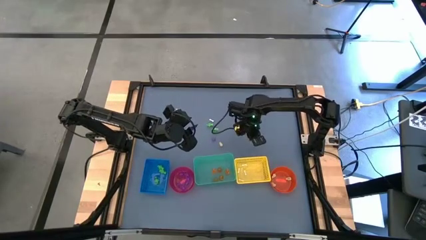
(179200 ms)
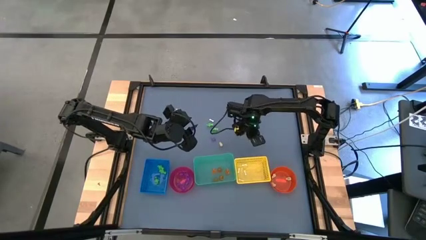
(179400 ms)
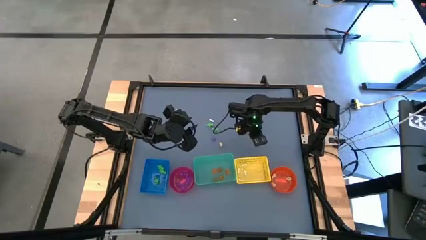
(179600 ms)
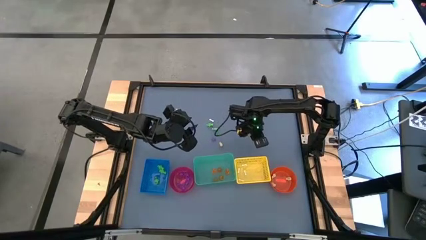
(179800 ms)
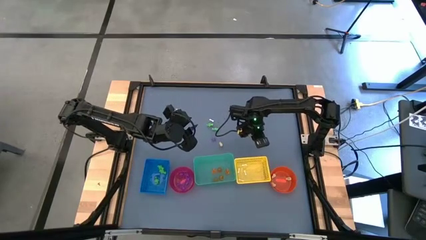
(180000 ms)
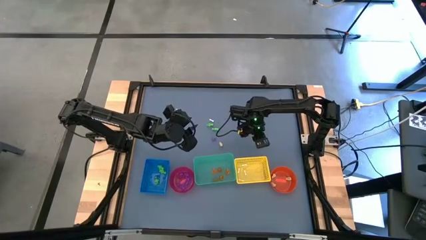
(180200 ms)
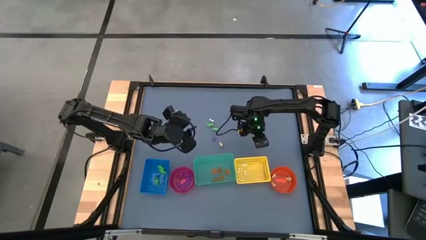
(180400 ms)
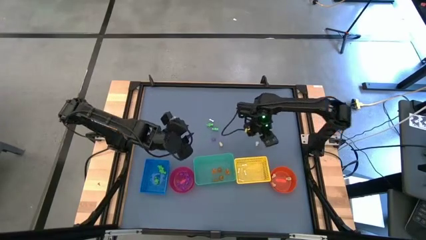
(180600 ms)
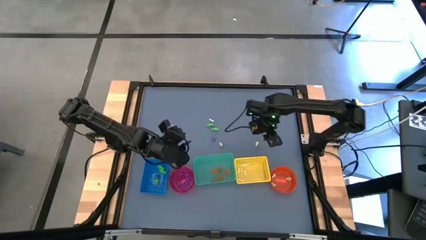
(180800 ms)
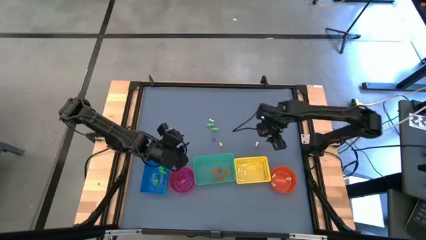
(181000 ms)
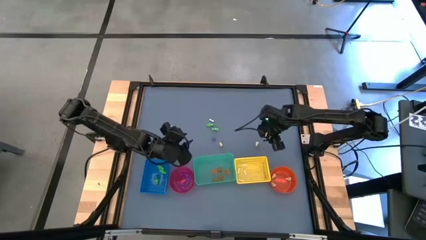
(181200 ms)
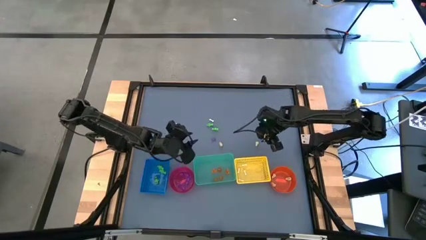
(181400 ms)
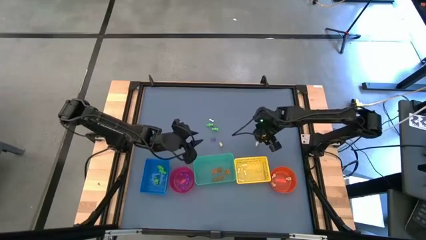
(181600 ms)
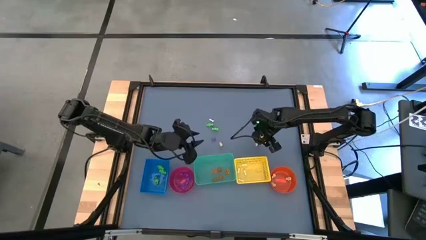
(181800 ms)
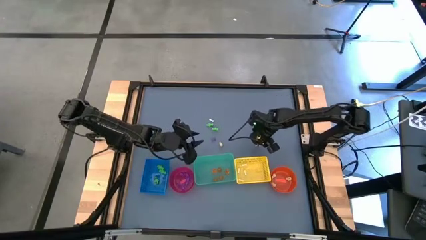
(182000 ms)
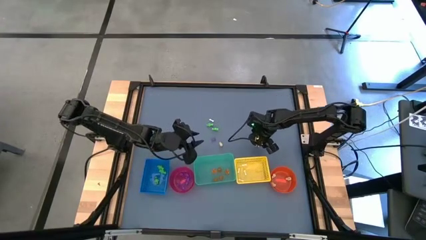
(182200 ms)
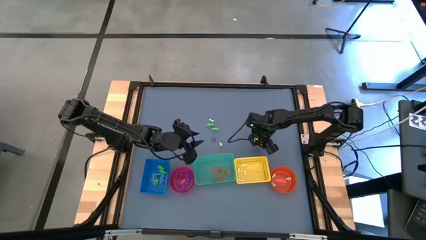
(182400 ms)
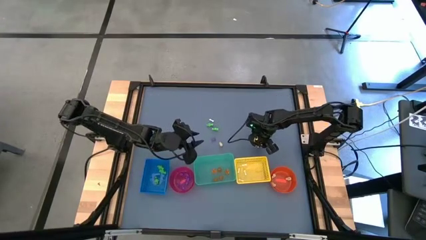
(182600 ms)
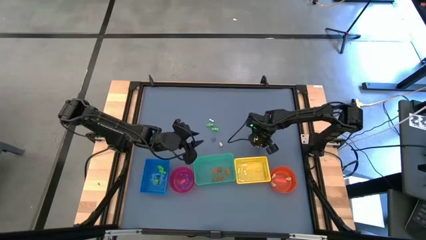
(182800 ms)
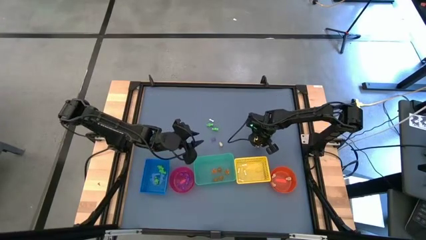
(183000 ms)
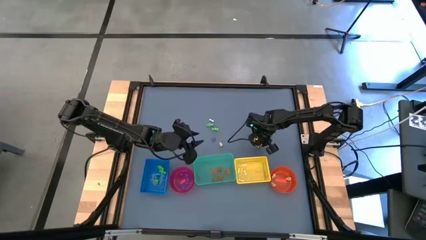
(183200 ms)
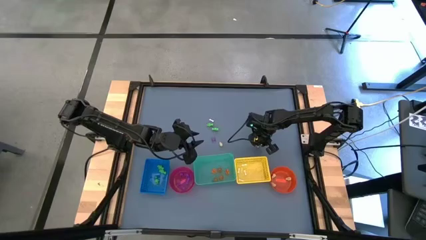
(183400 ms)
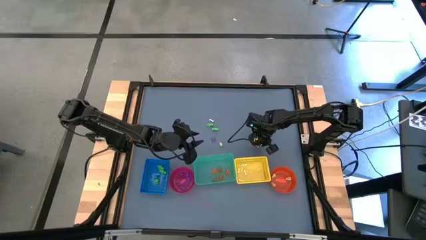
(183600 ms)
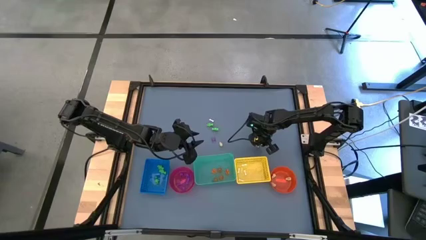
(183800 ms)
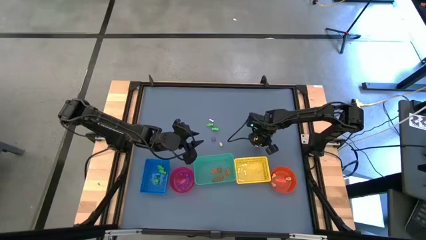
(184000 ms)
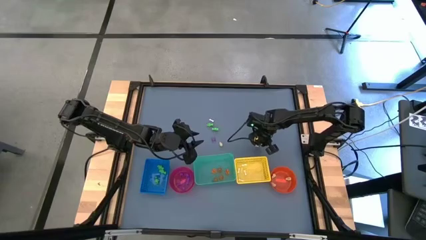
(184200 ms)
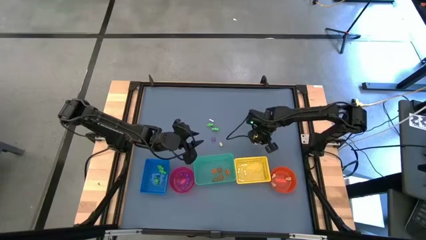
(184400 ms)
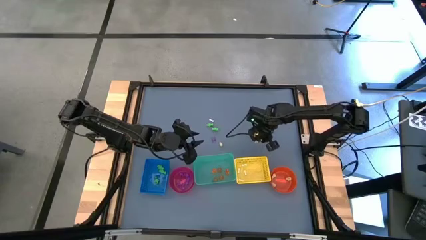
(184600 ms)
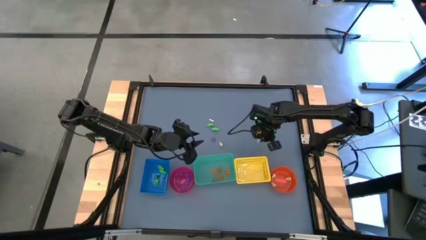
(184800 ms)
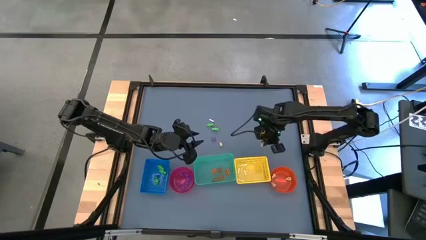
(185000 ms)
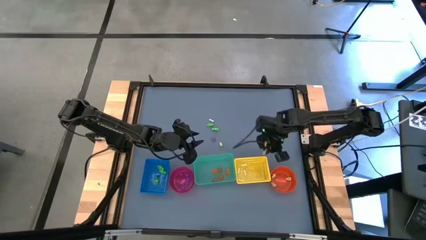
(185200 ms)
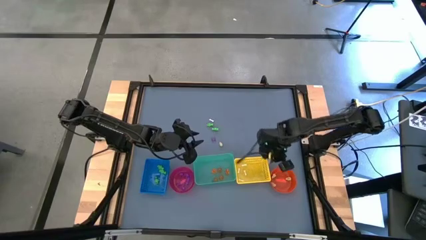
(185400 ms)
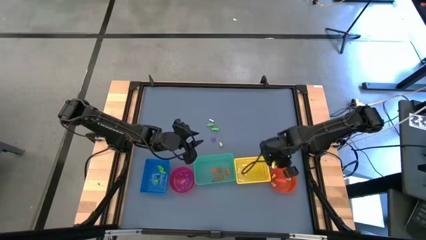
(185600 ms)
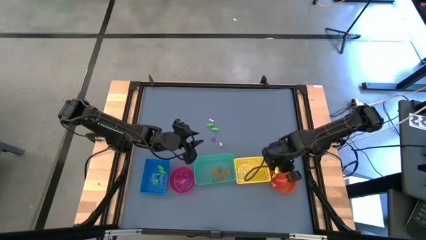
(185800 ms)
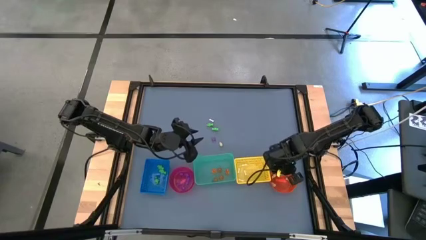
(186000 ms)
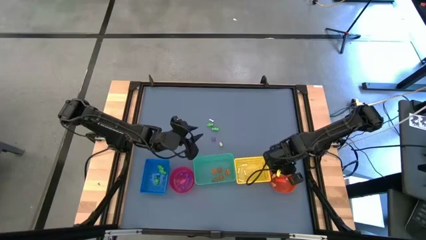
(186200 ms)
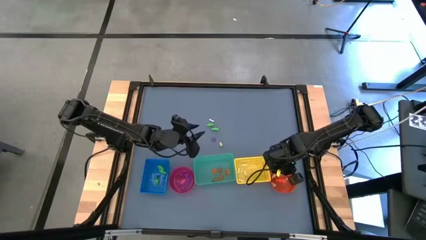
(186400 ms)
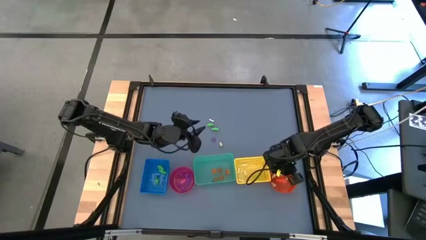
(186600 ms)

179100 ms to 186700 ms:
Task: Sort Halloween decoration
Put the white skull toy into the orange bin

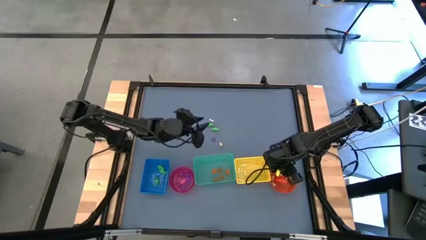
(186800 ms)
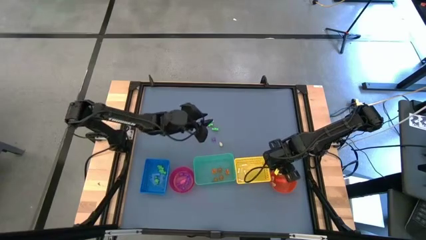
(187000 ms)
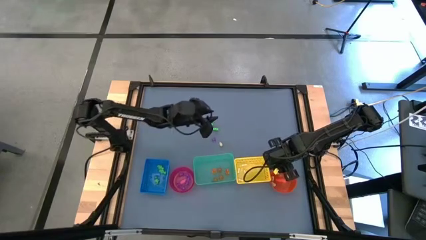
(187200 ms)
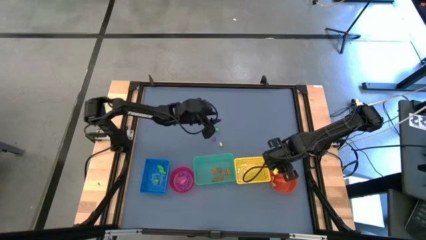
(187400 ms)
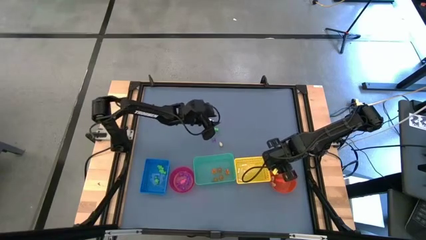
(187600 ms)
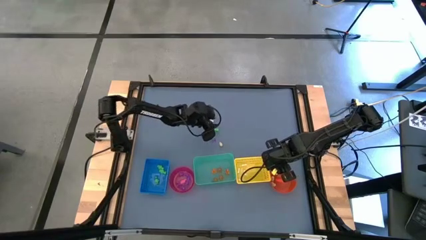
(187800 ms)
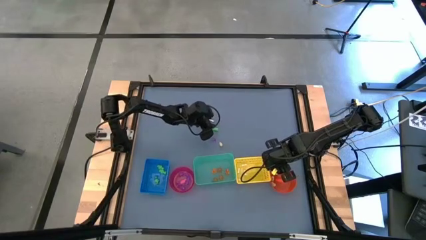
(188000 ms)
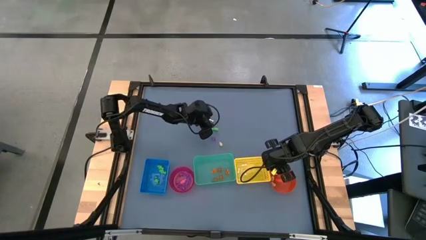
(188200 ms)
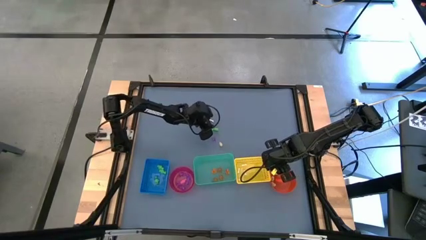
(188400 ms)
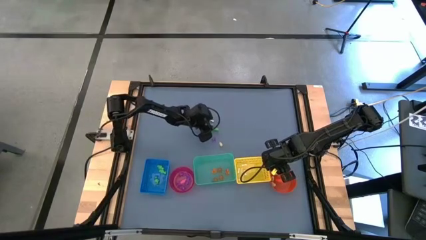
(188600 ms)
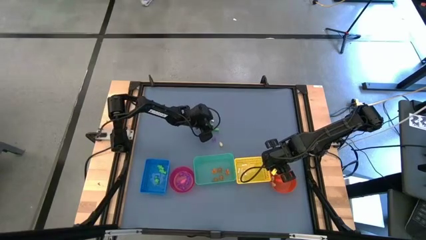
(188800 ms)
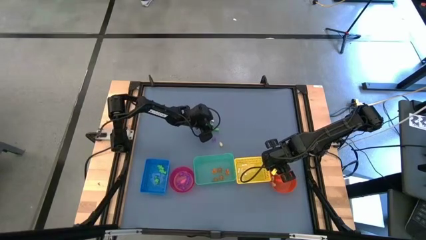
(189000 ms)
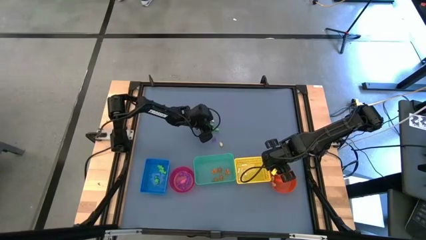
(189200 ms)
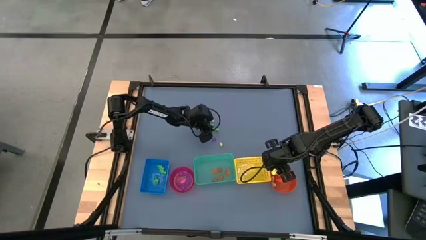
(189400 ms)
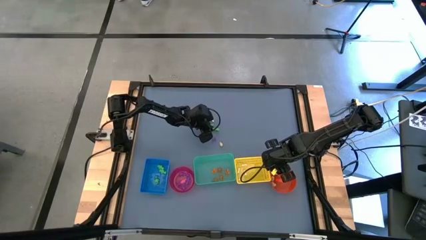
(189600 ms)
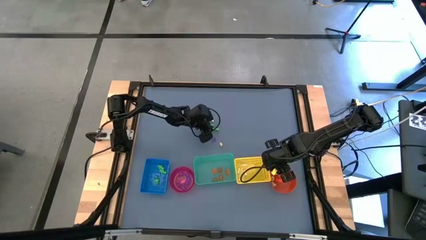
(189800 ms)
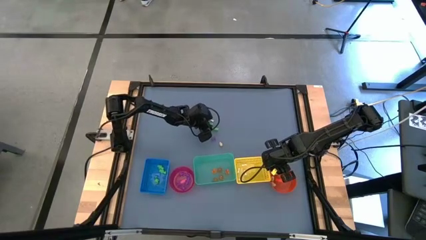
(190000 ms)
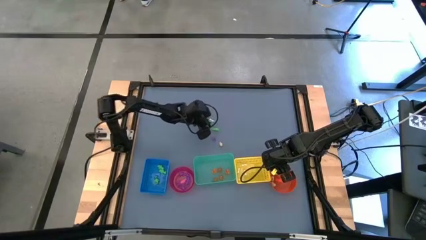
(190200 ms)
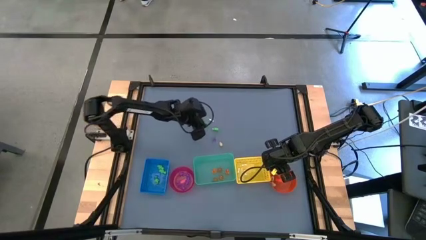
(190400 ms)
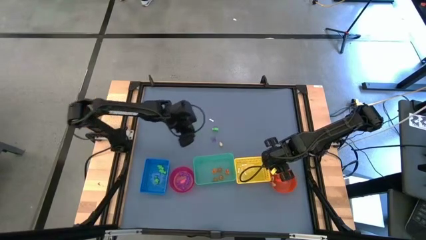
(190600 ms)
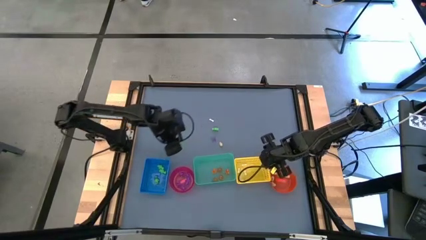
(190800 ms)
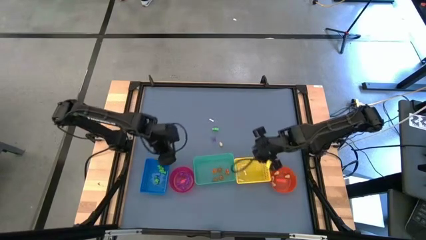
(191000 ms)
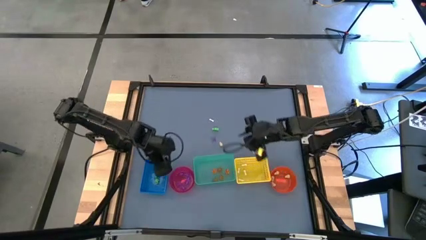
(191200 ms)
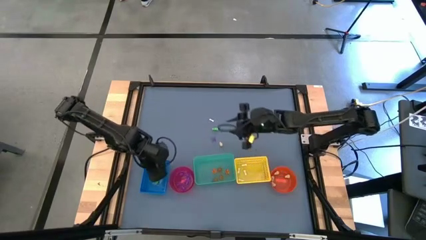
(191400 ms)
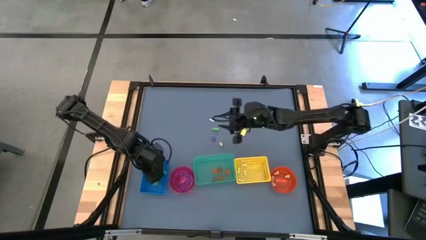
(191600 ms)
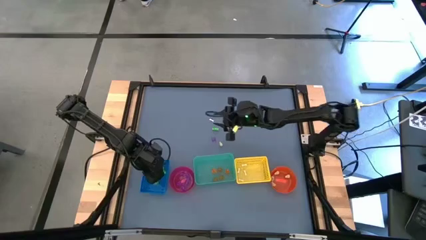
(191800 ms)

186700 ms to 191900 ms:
Put the green skeleton toy into the blue bin

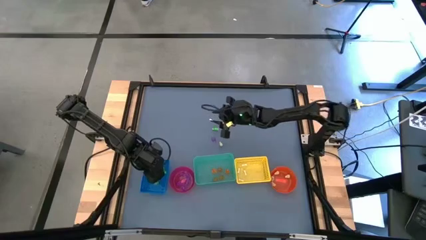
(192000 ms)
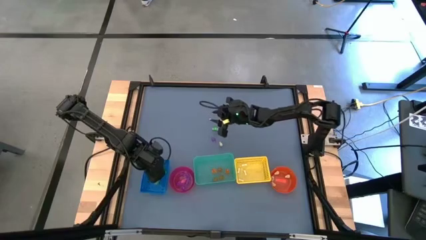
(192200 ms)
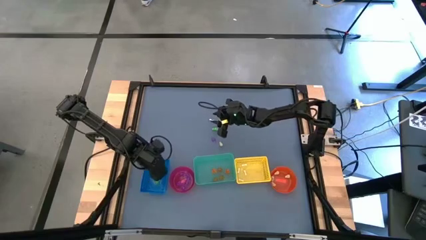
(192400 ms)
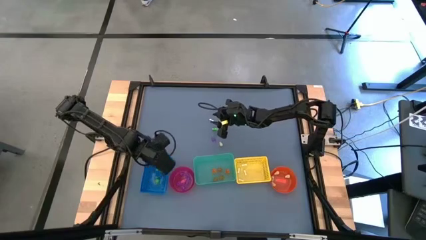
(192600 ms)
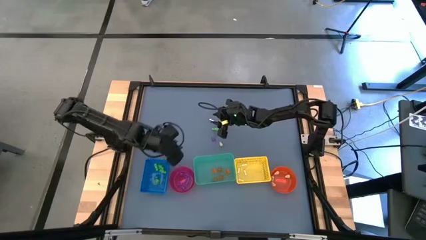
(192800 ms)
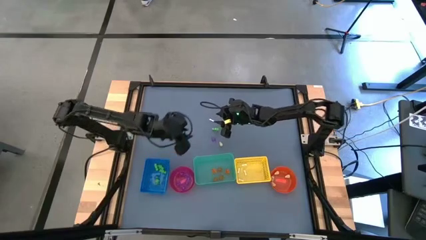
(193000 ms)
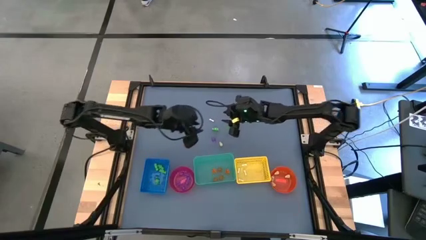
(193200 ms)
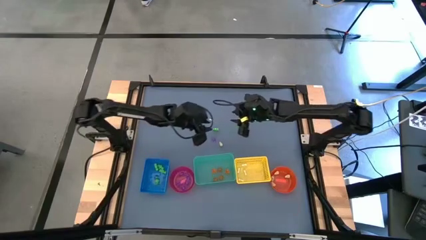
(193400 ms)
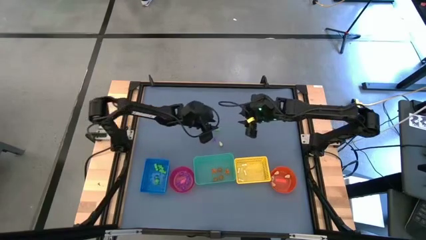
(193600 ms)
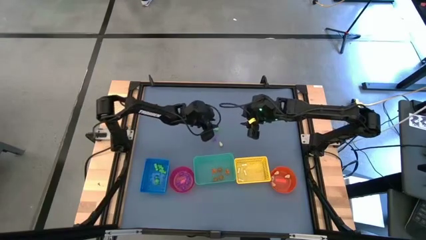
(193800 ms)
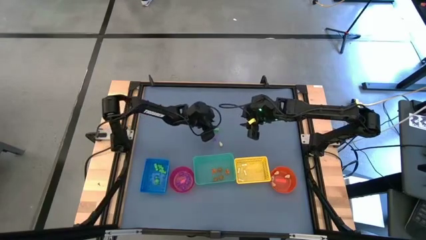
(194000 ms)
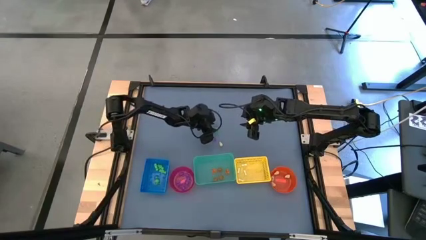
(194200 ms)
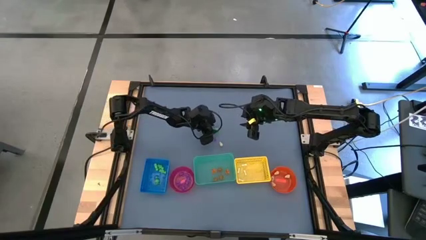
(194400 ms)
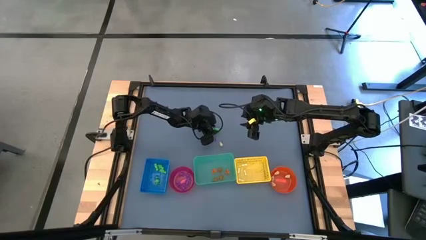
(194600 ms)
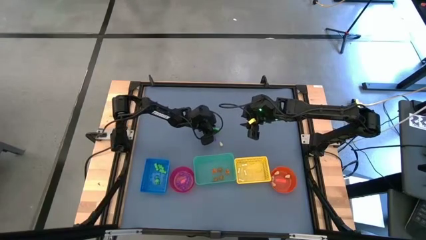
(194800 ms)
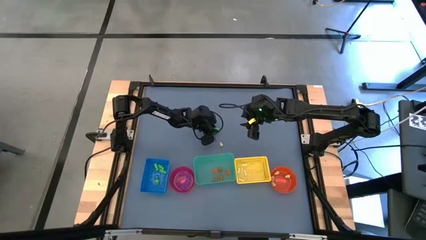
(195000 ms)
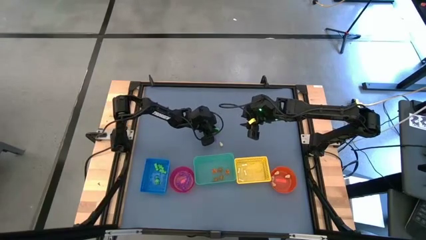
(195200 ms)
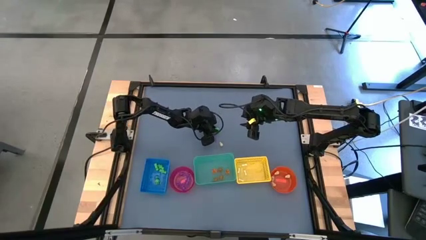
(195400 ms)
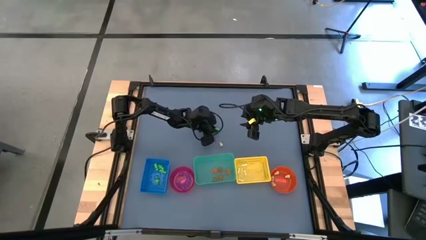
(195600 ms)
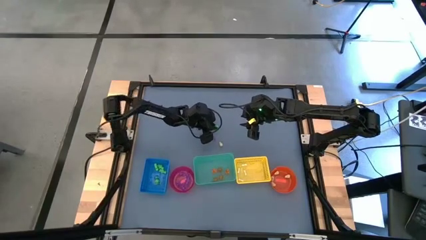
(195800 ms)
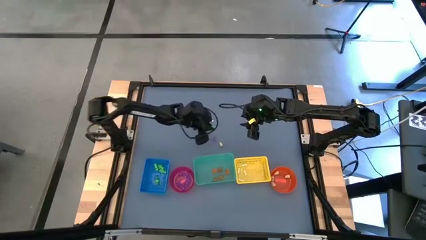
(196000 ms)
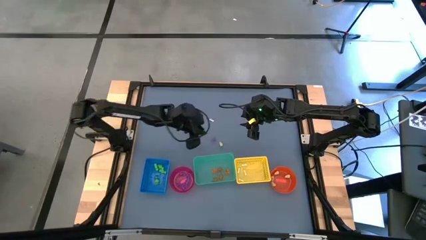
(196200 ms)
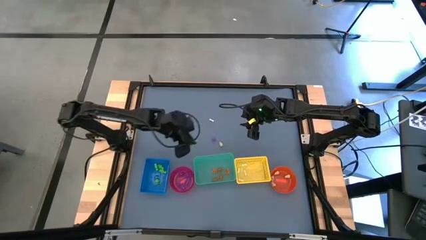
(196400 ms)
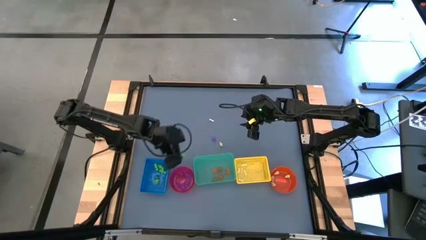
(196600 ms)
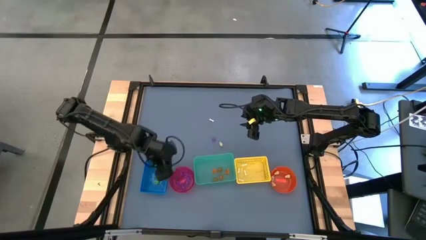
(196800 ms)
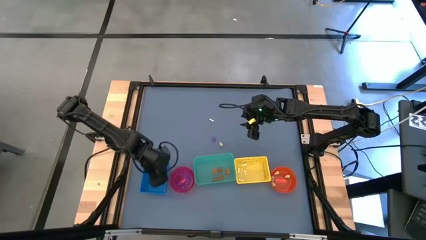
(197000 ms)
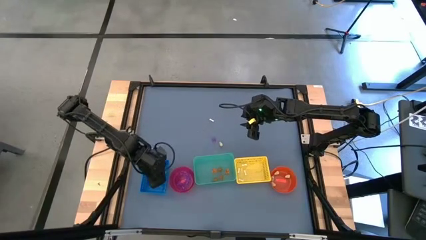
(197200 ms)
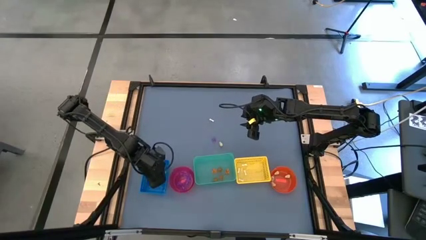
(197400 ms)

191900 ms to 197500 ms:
Put the green skeleton toy into the blue bin
